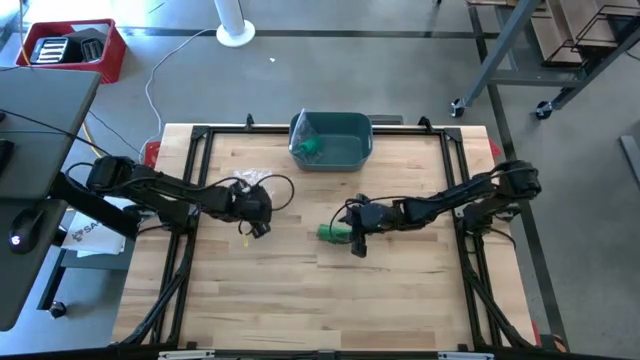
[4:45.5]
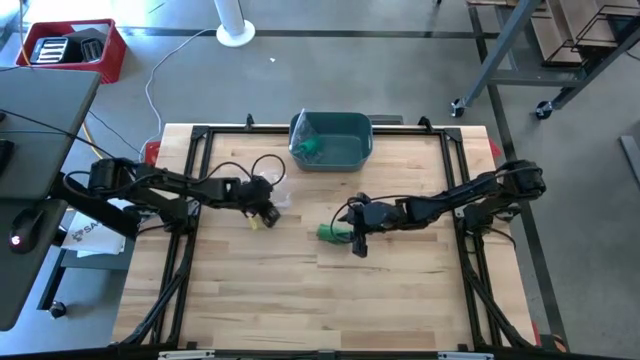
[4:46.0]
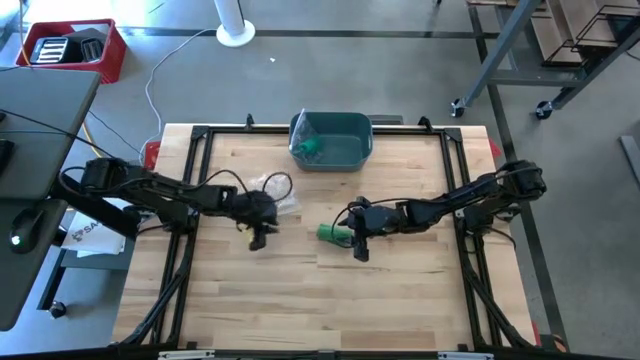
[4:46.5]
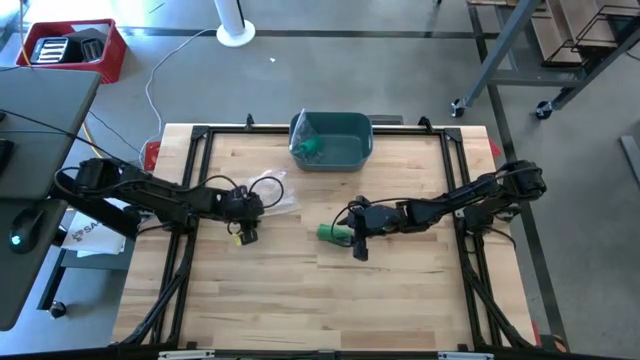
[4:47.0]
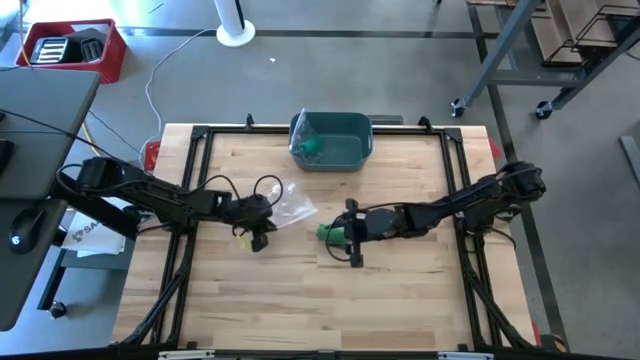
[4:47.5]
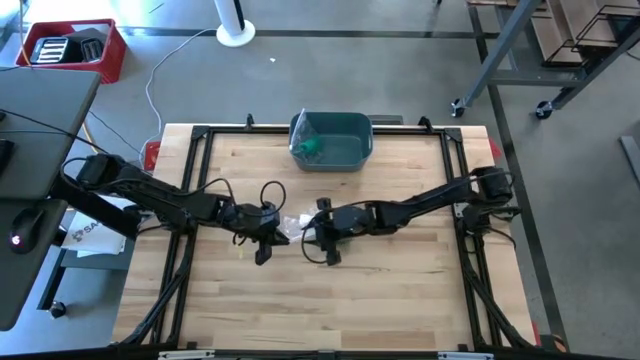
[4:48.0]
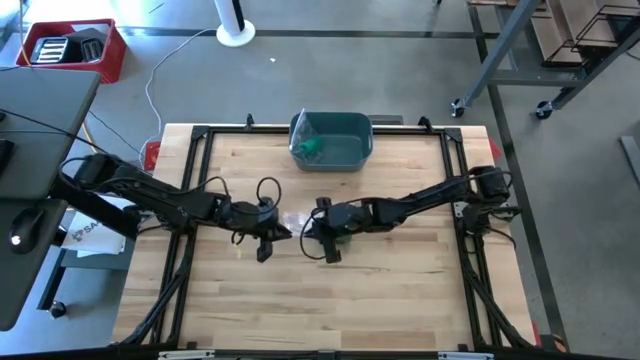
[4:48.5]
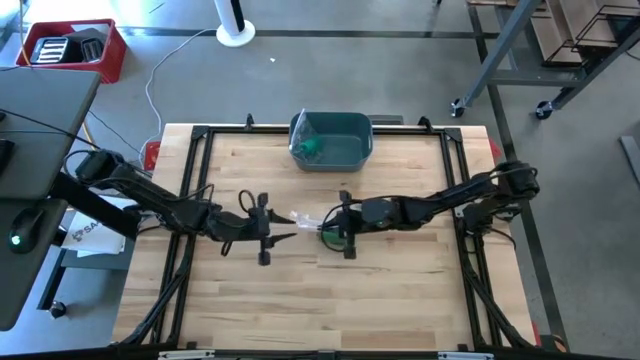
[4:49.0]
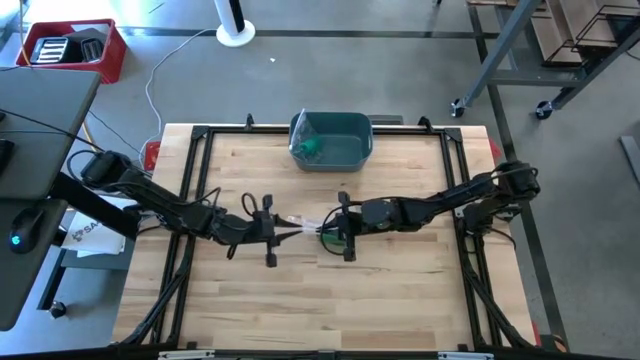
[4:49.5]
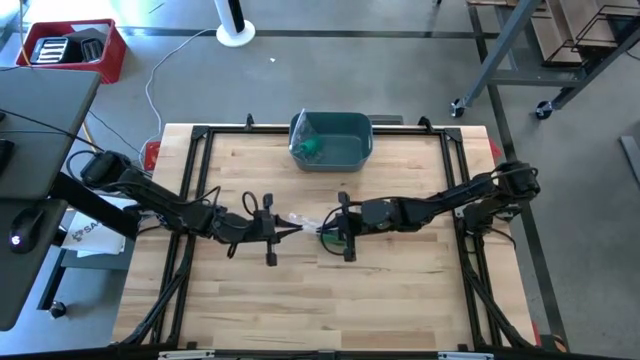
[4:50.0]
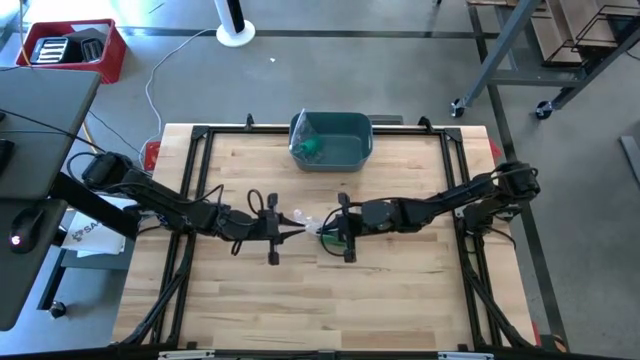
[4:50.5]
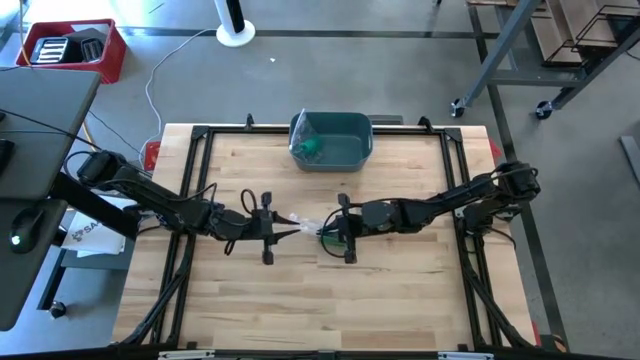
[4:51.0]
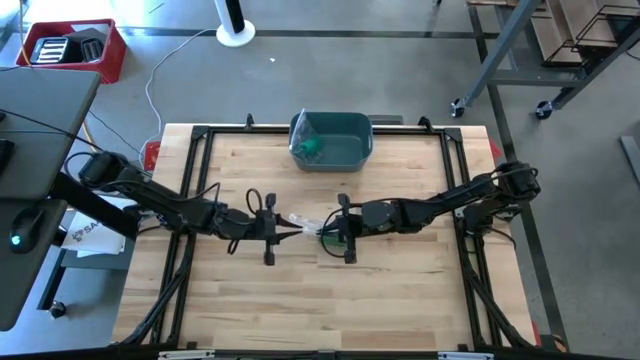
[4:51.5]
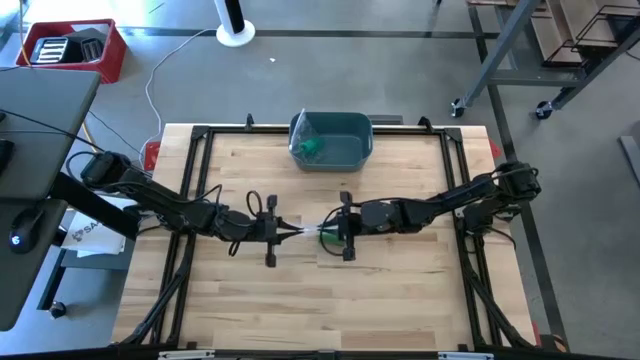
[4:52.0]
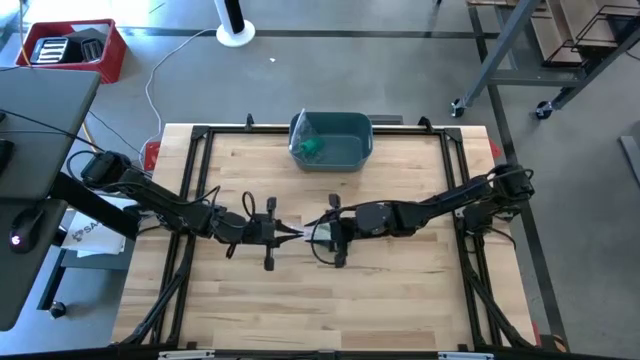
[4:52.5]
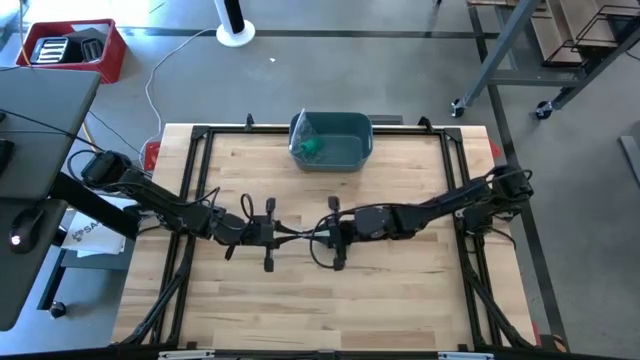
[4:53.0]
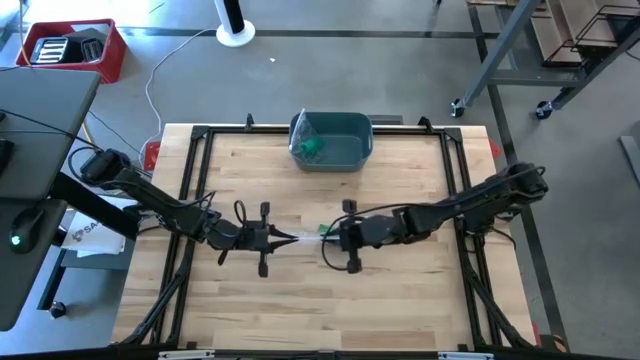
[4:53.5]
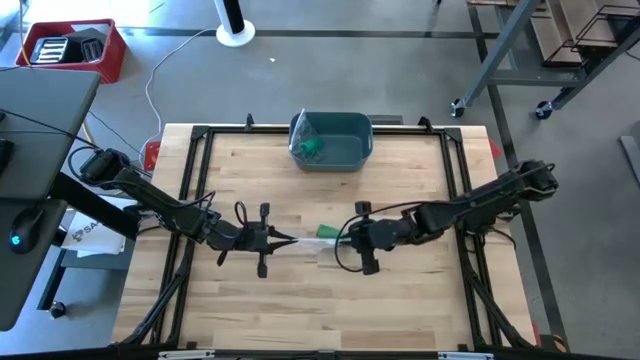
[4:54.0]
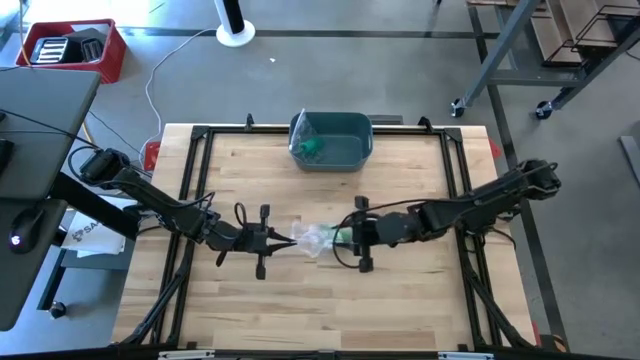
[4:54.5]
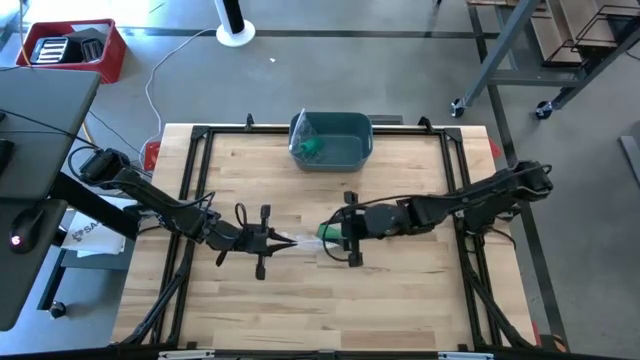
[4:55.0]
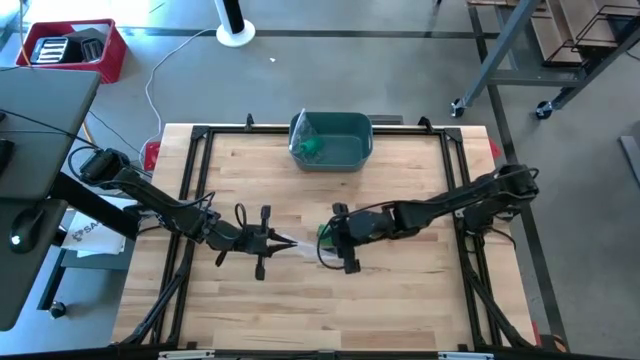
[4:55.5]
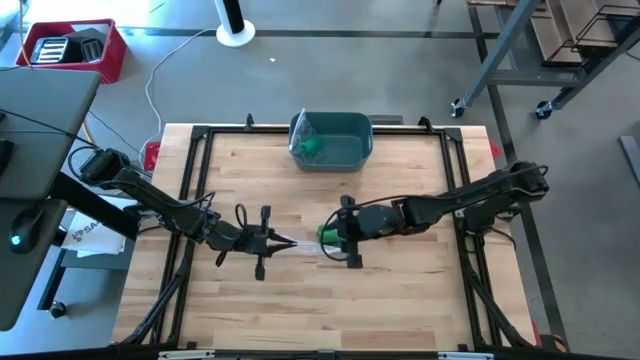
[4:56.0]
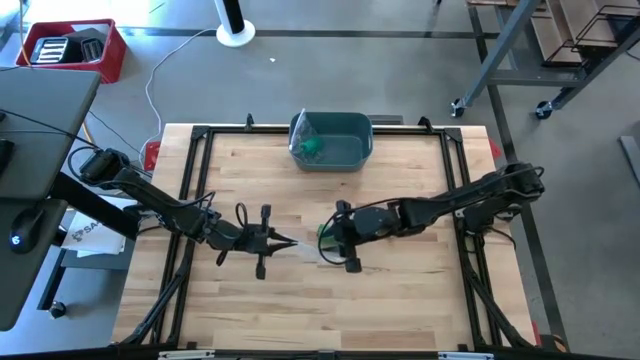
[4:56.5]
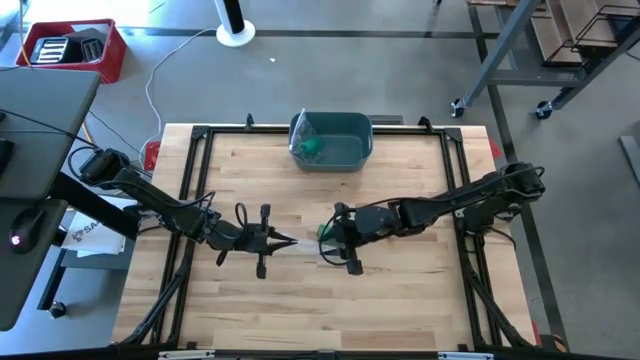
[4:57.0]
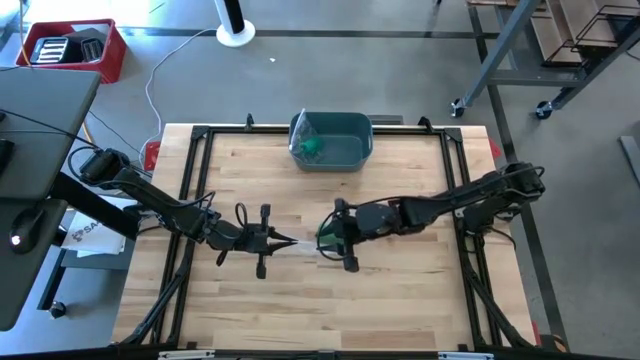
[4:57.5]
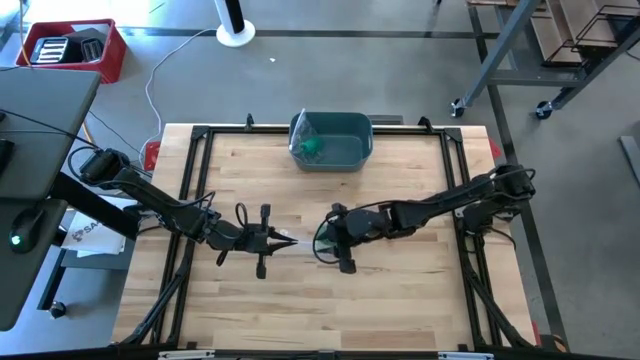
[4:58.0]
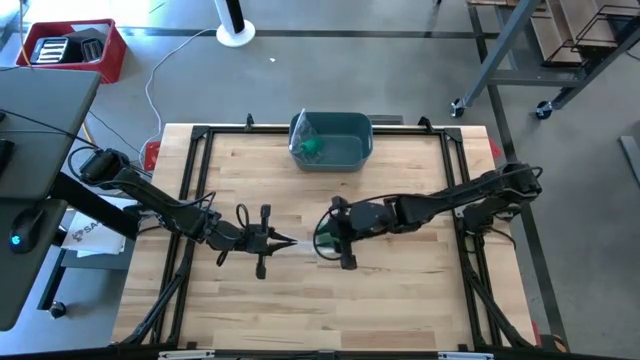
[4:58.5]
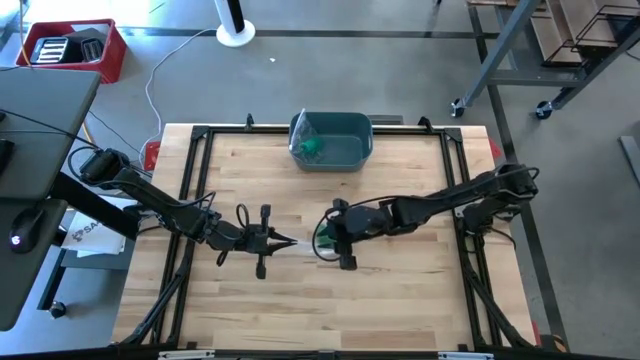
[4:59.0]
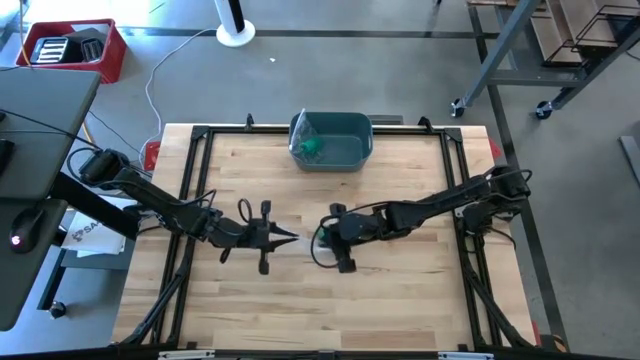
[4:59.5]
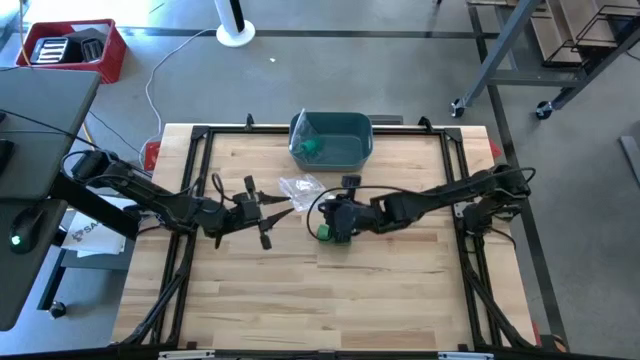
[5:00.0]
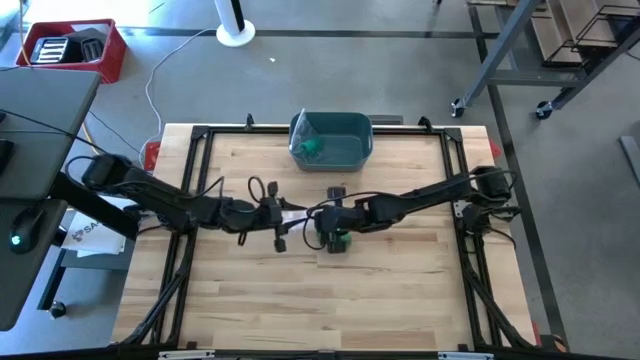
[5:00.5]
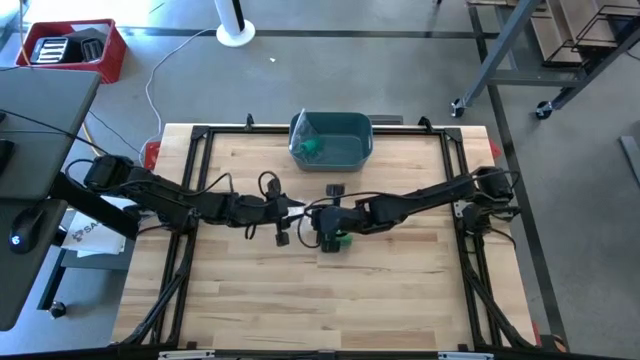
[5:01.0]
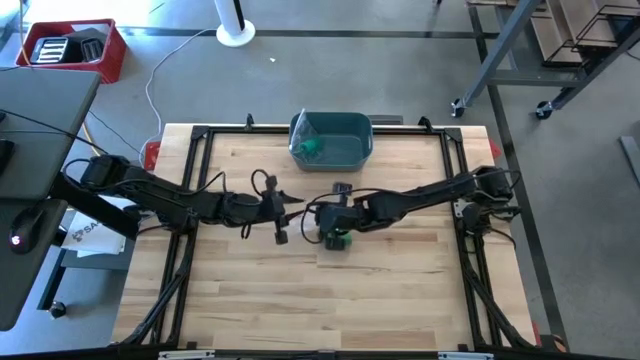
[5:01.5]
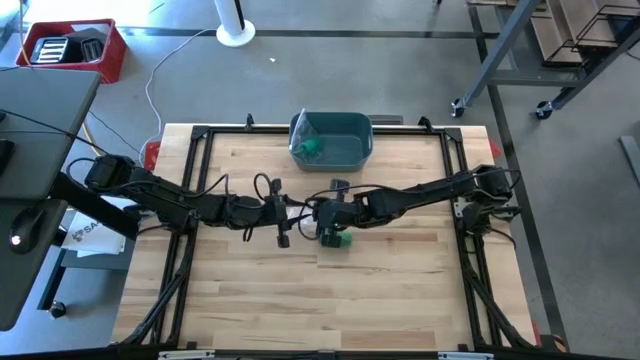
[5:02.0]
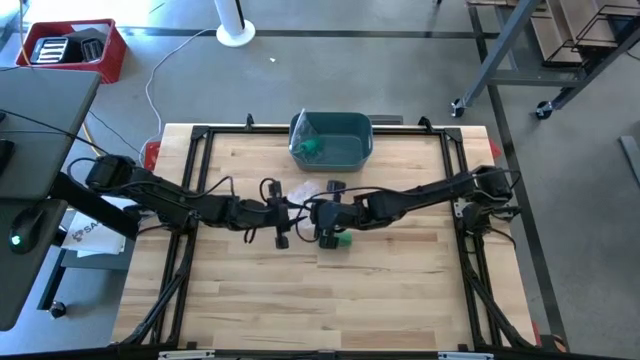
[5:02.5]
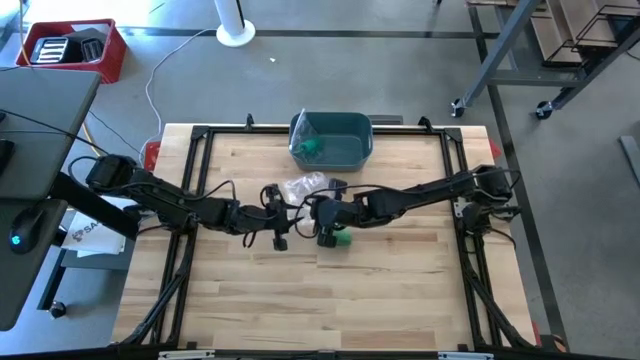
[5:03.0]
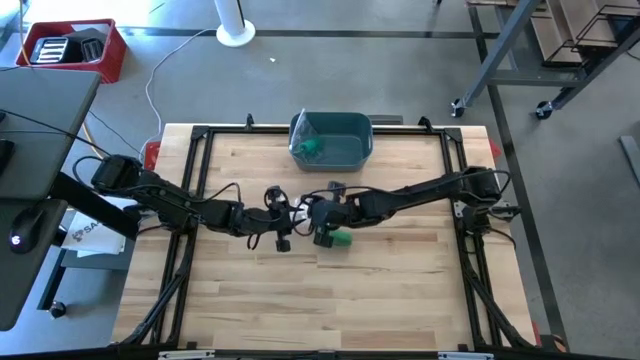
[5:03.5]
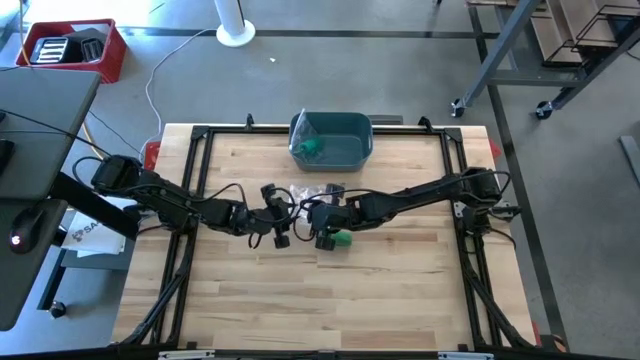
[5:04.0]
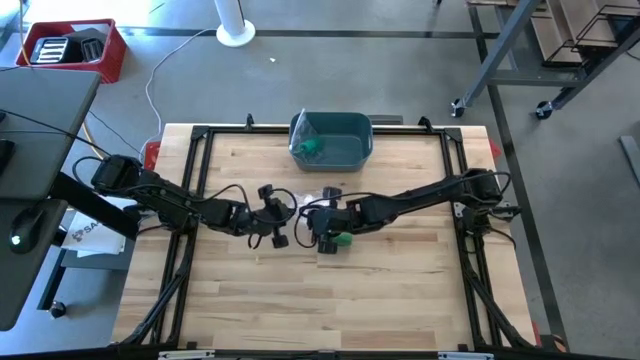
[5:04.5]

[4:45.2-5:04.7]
Task: Roll bandage
Open the transparent zip bag
